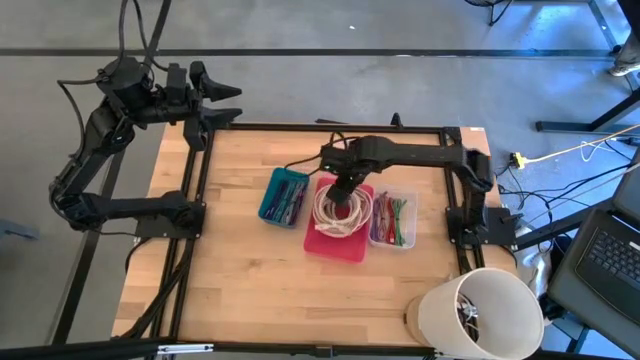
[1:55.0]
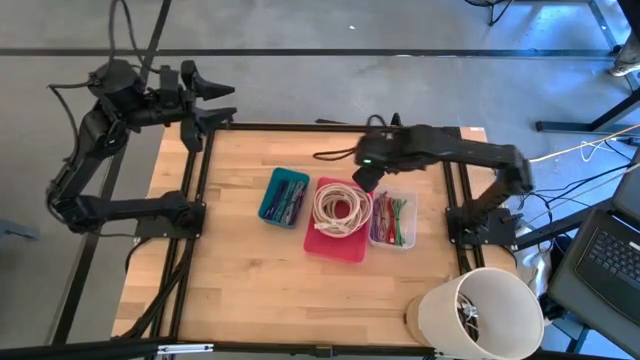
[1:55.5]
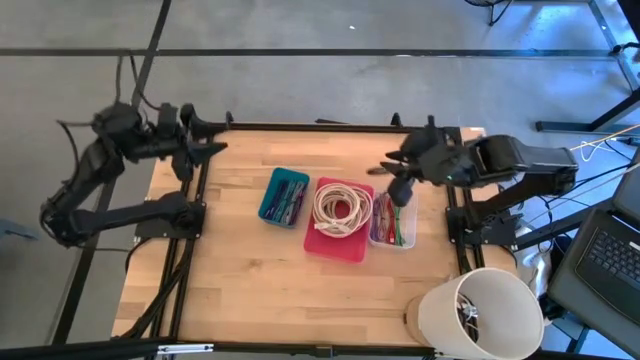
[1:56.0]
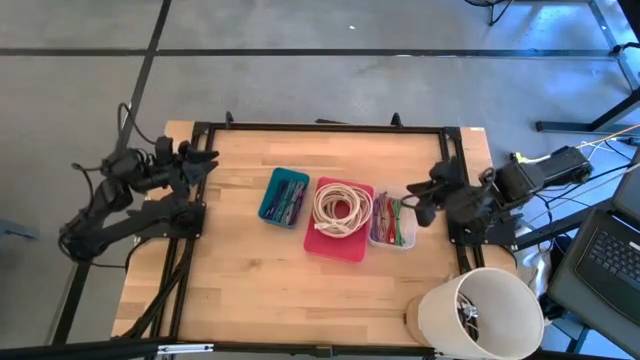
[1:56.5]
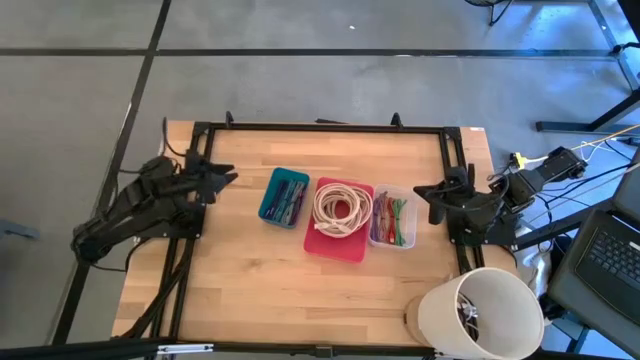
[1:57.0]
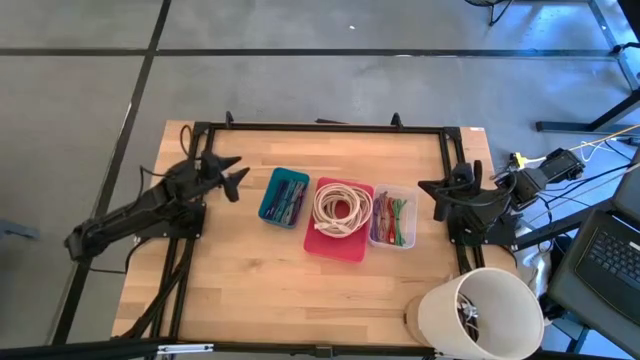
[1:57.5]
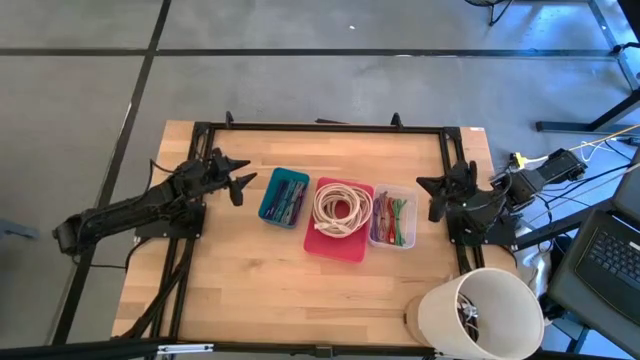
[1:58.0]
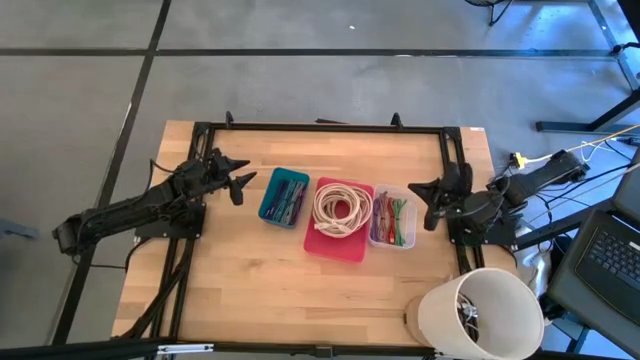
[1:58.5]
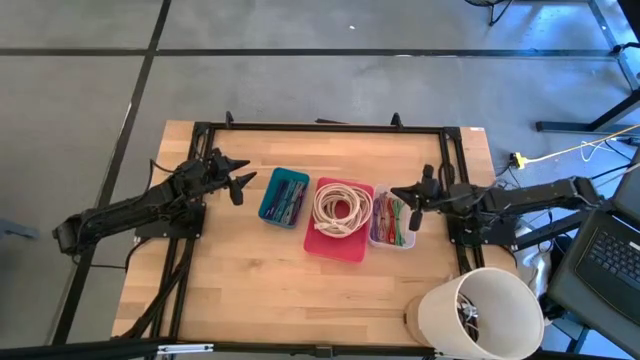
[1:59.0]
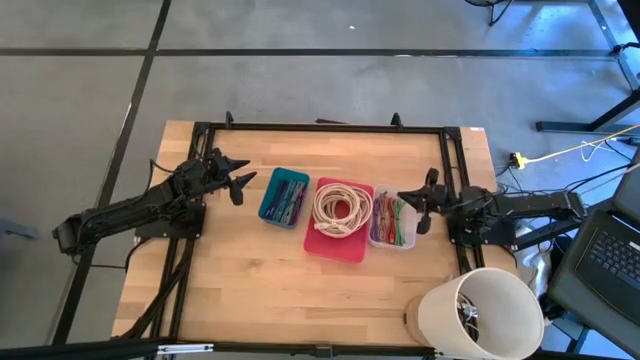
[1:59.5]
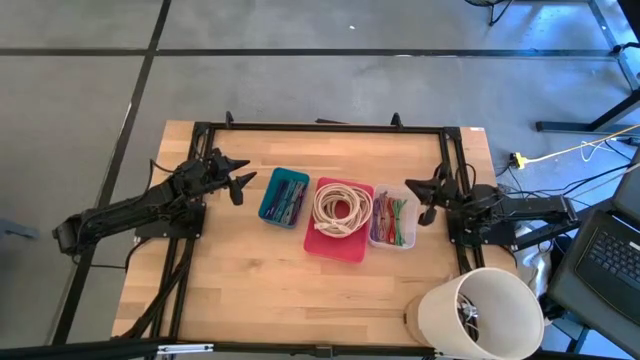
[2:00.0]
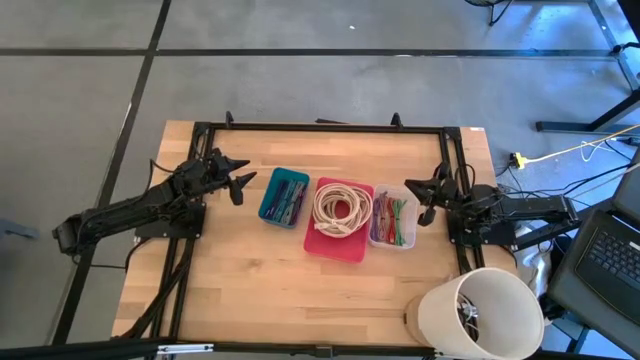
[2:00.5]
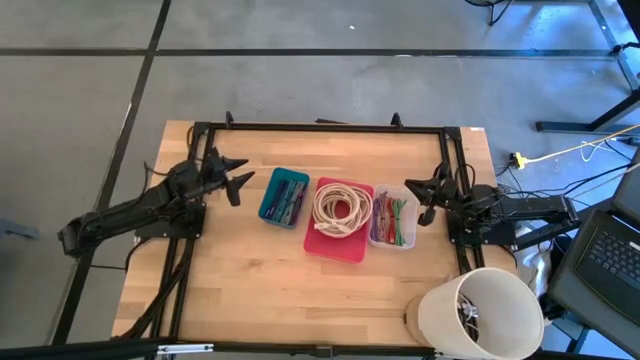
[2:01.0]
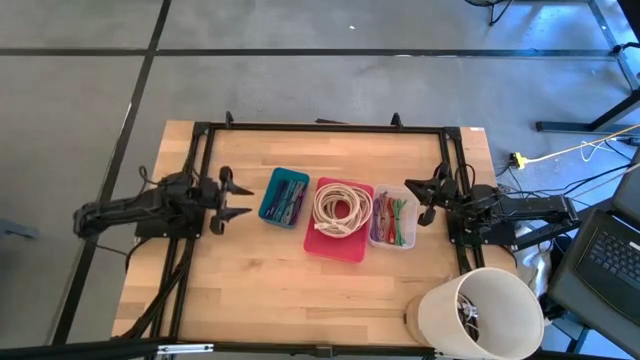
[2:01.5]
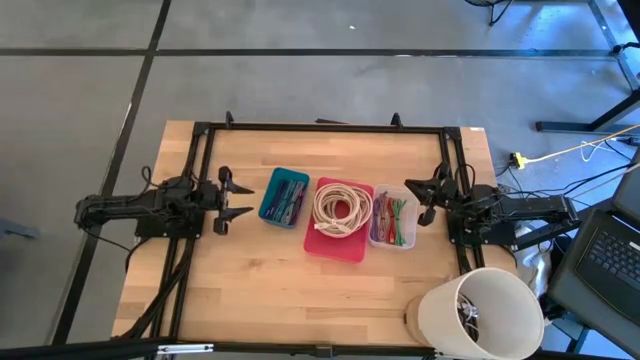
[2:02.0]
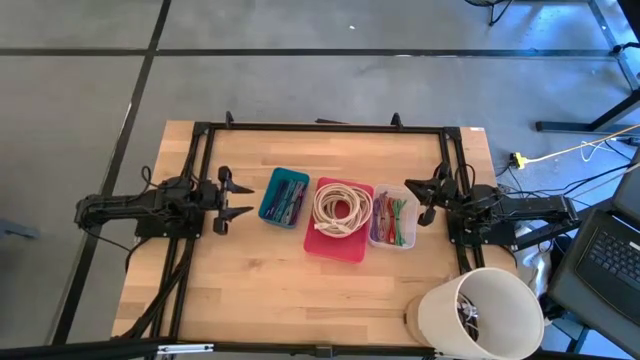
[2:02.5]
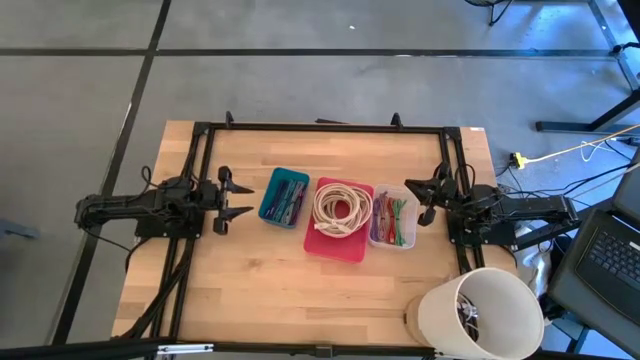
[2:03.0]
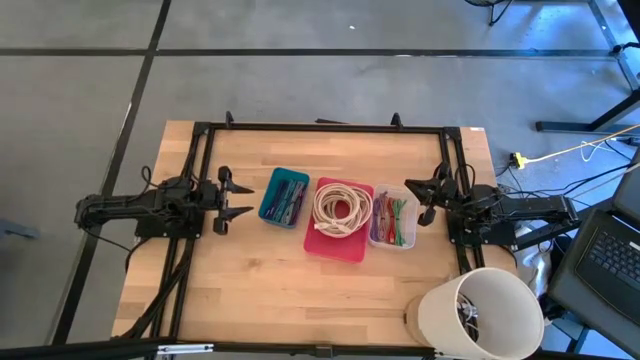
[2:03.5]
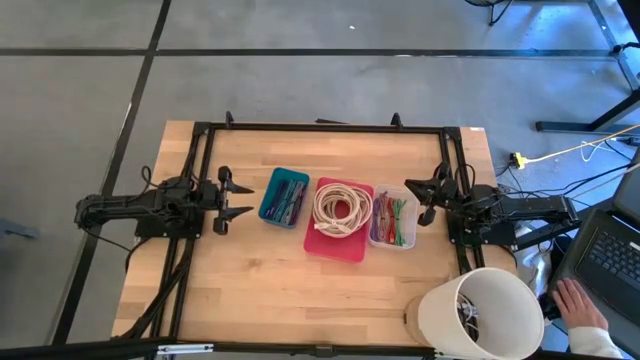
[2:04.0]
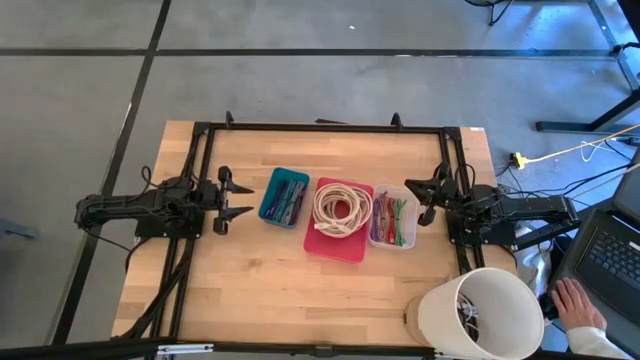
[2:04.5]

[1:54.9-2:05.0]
Task: Pick & Place USB Port
Return to Home Position

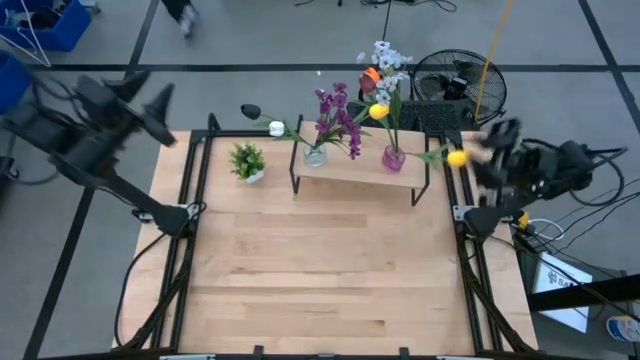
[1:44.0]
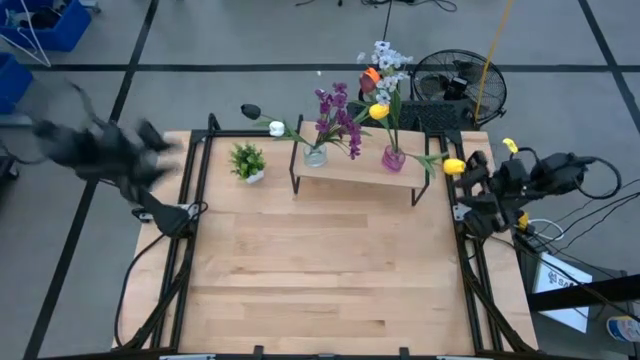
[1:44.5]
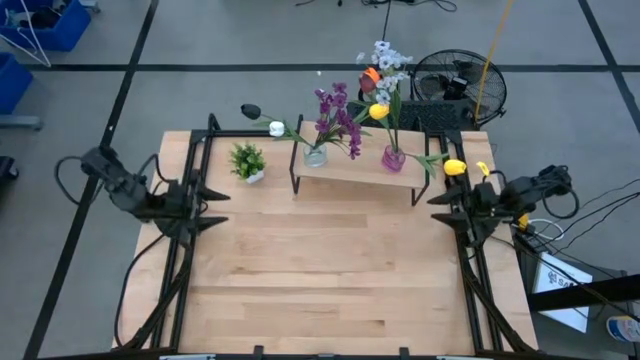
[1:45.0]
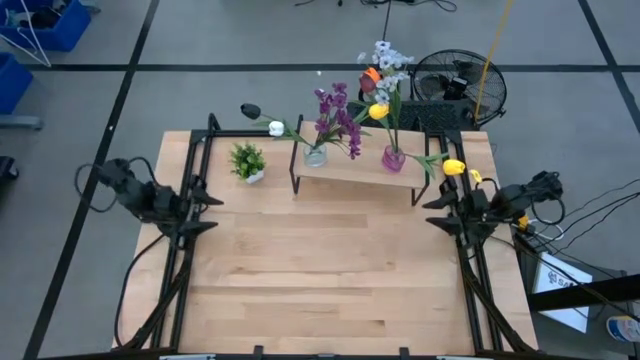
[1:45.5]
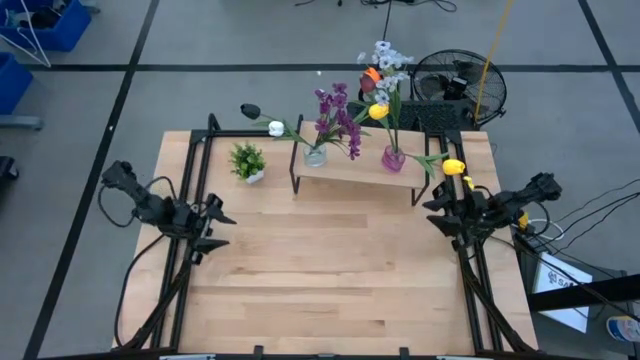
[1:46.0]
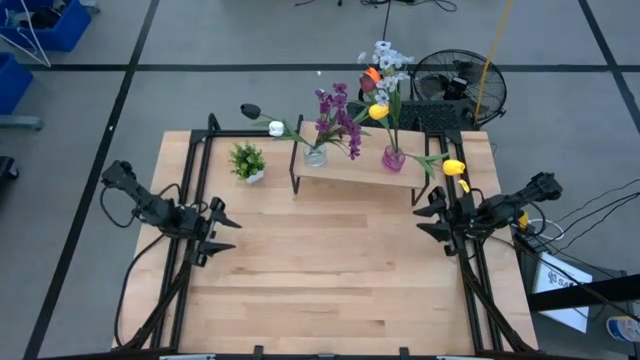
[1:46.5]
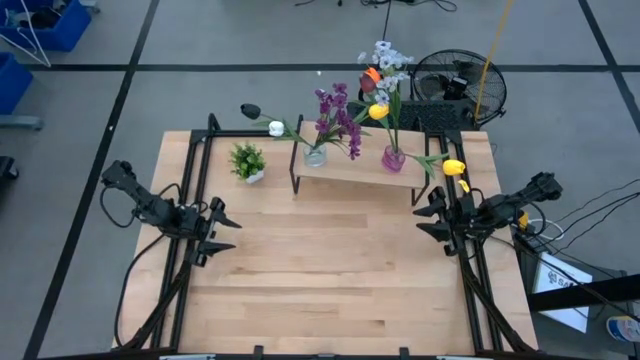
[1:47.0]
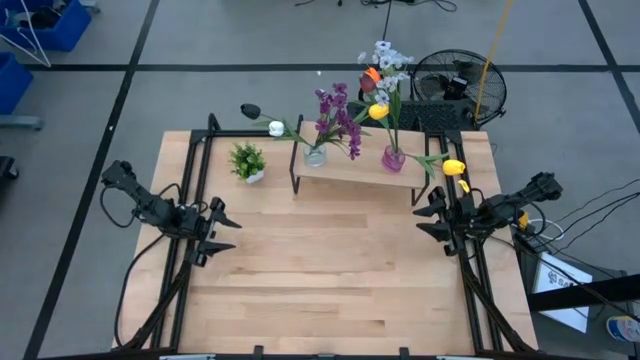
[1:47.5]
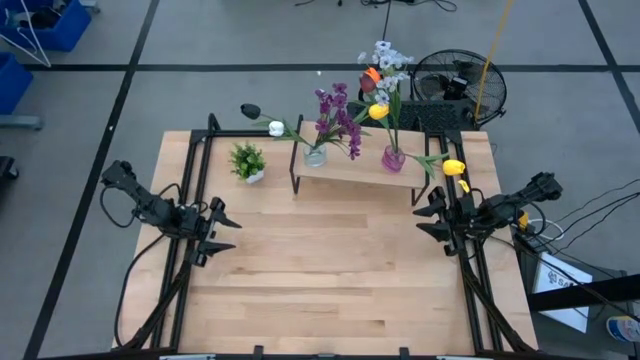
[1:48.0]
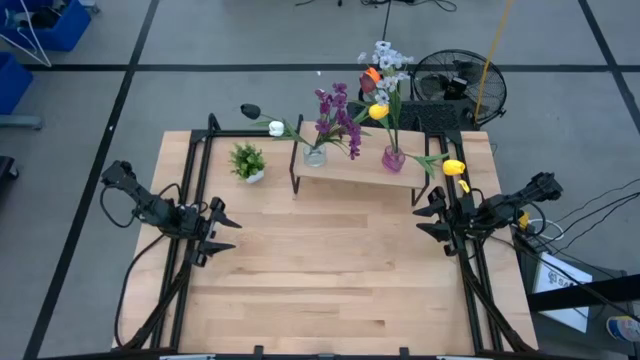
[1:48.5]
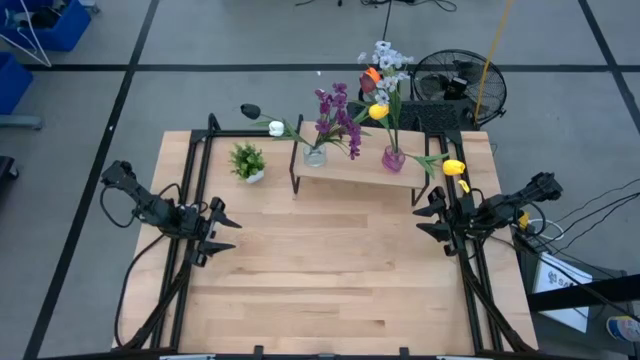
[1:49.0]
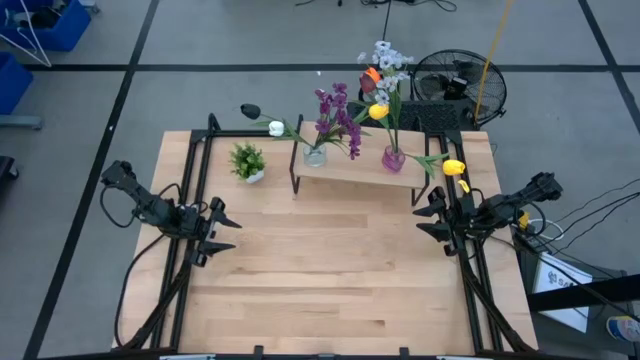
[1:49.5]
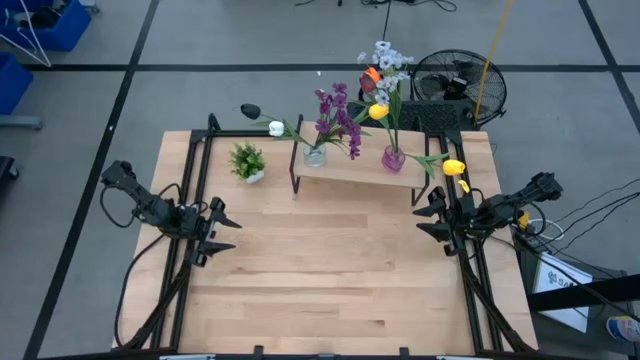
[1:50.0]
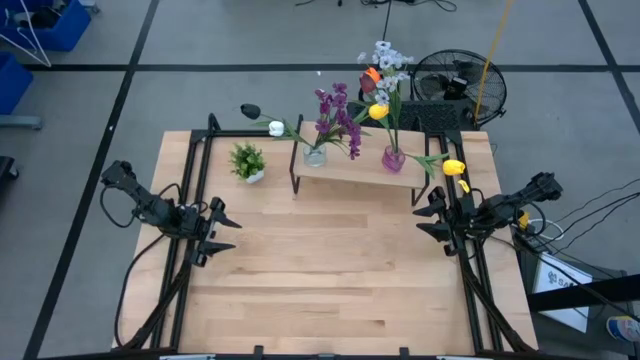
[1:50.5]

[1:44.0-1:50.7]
Task: Pick and place flowers into a vace then onto a shelf
Return to Home Position
